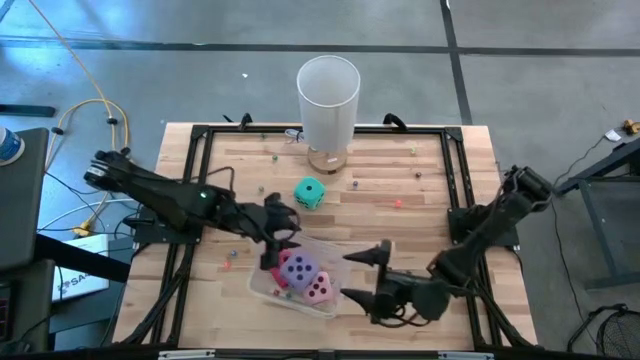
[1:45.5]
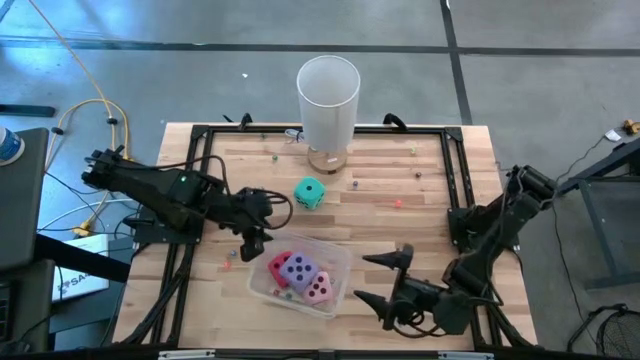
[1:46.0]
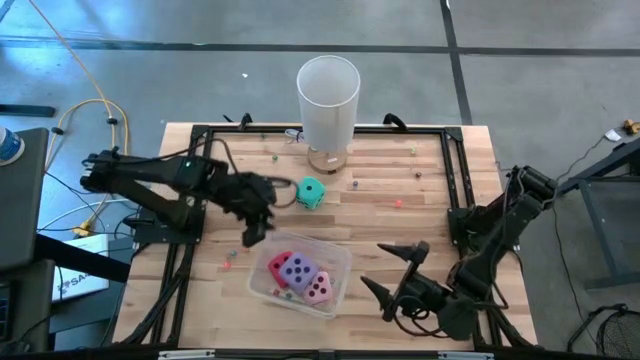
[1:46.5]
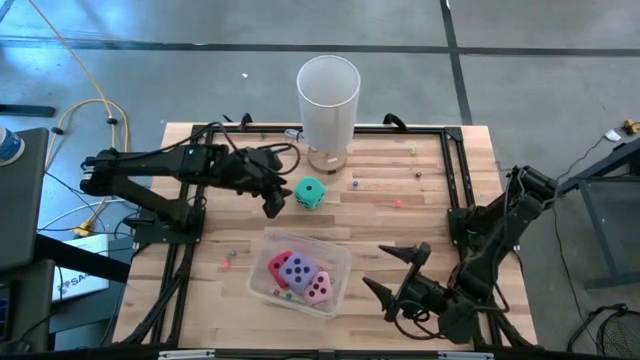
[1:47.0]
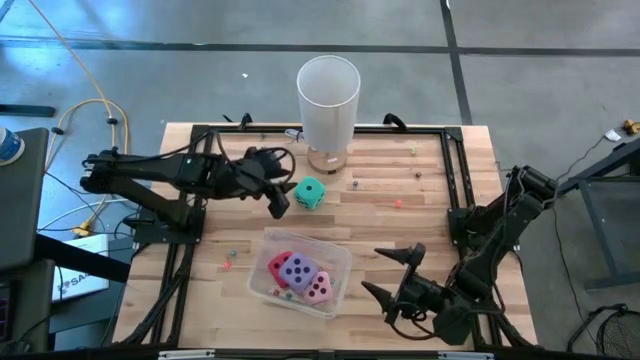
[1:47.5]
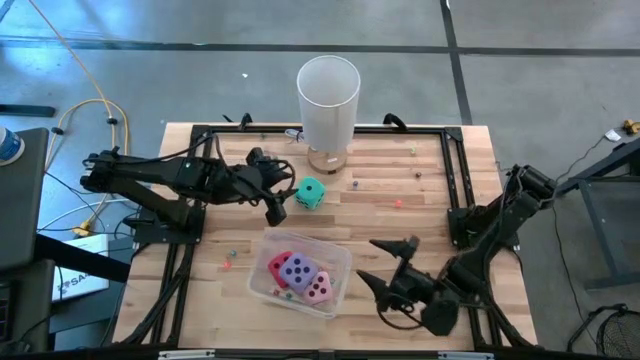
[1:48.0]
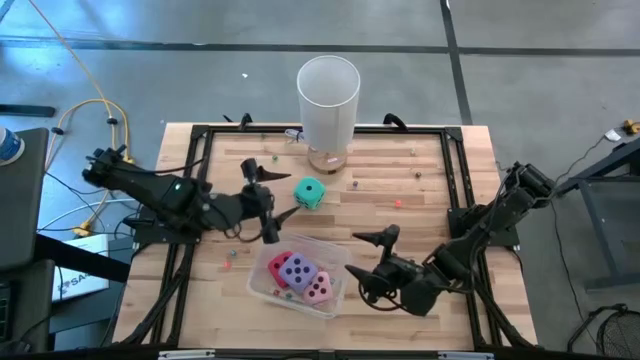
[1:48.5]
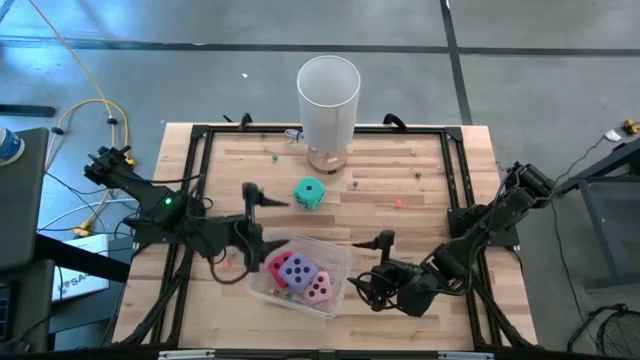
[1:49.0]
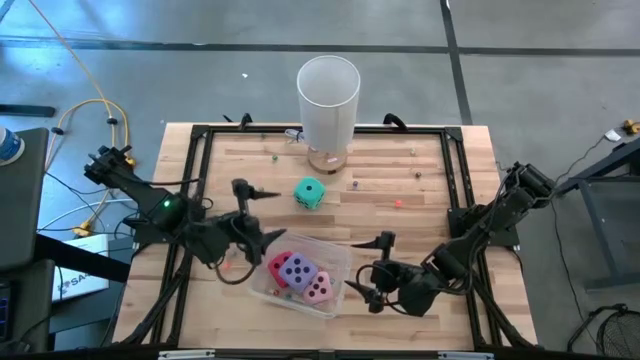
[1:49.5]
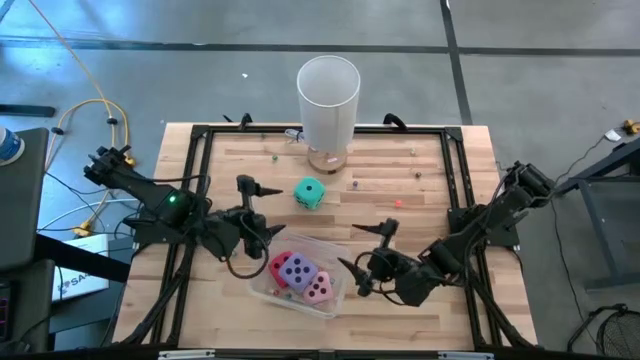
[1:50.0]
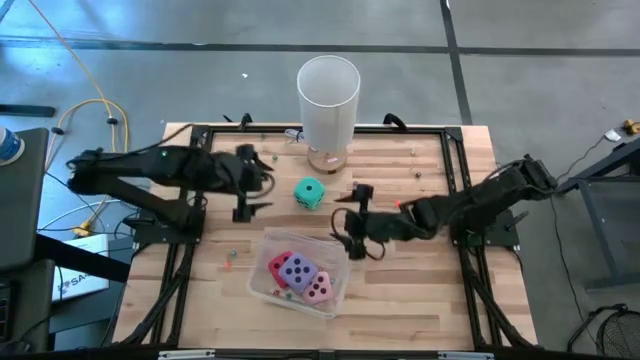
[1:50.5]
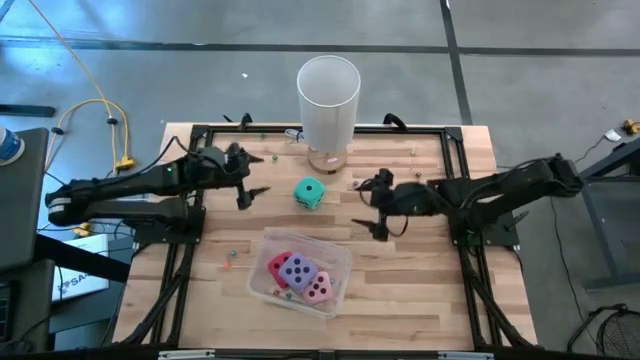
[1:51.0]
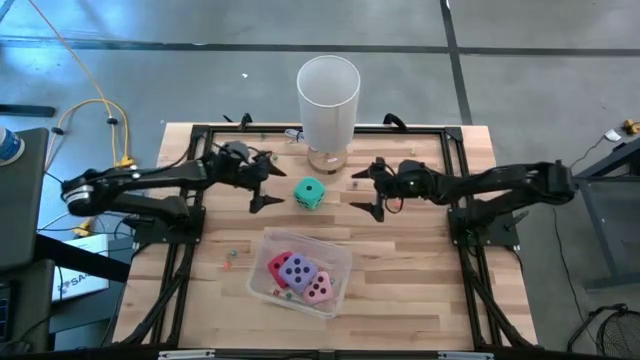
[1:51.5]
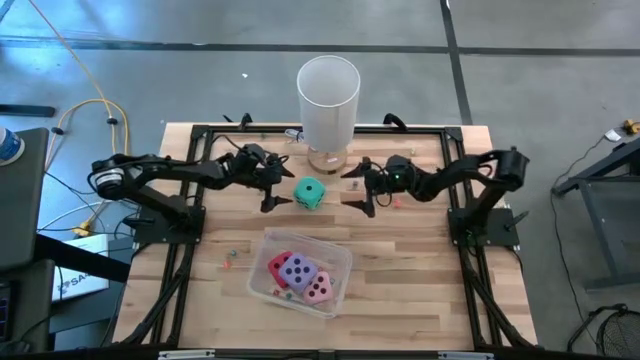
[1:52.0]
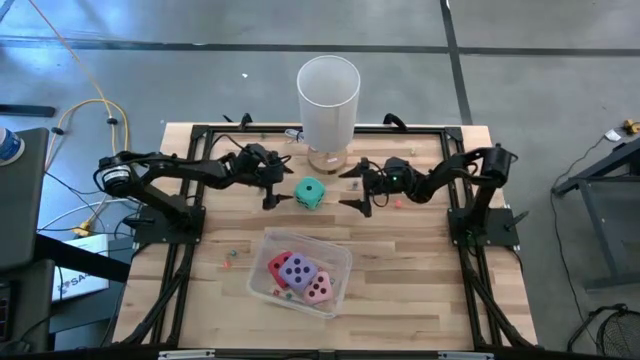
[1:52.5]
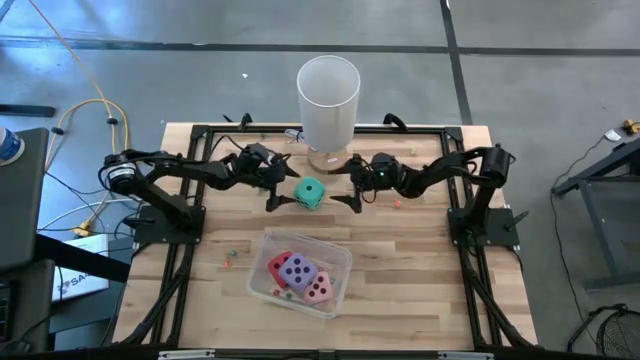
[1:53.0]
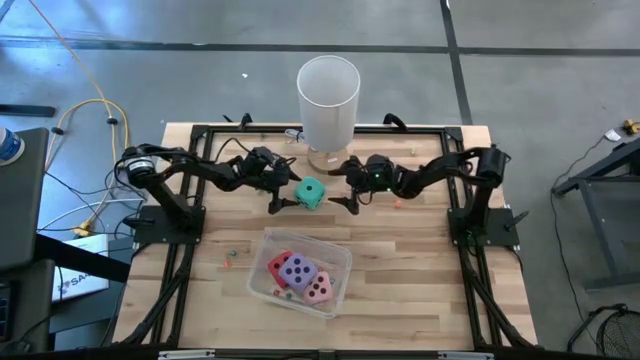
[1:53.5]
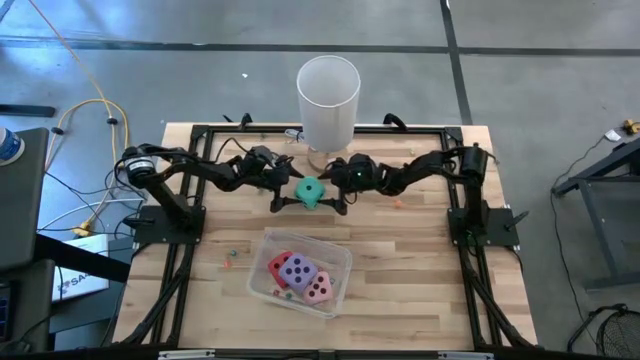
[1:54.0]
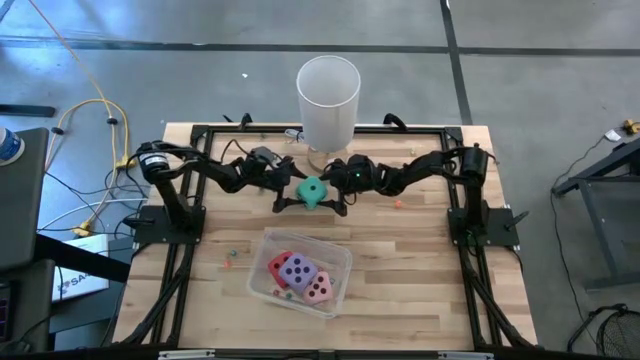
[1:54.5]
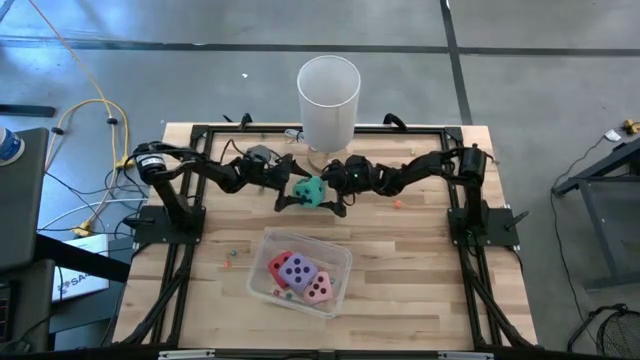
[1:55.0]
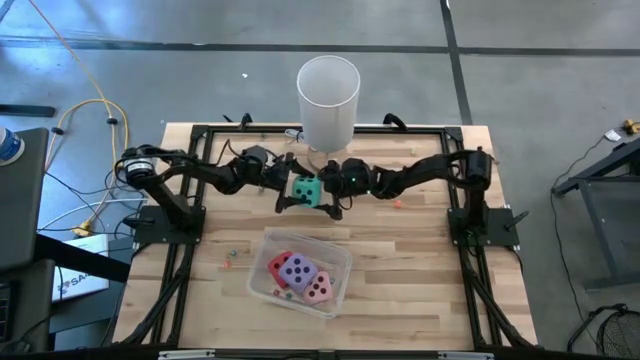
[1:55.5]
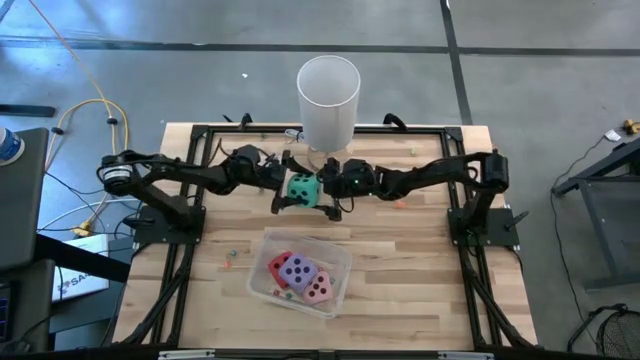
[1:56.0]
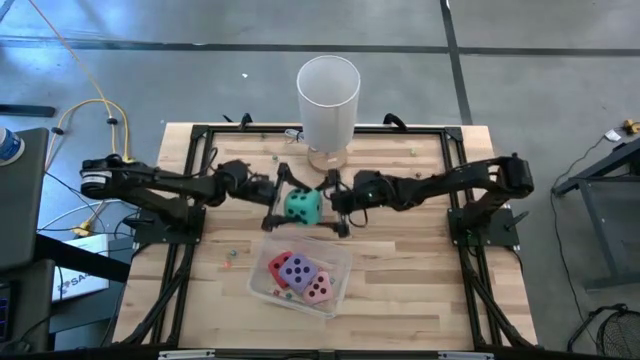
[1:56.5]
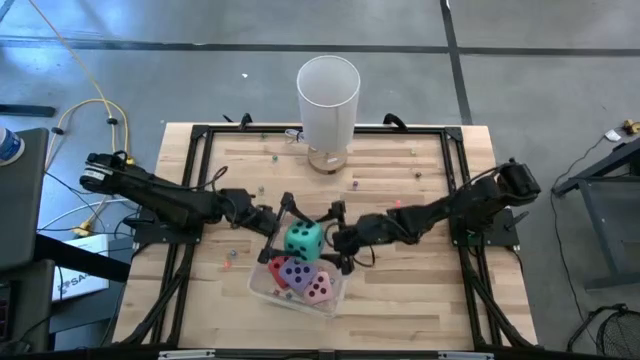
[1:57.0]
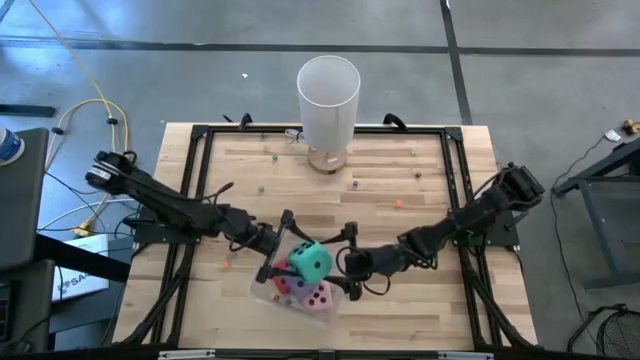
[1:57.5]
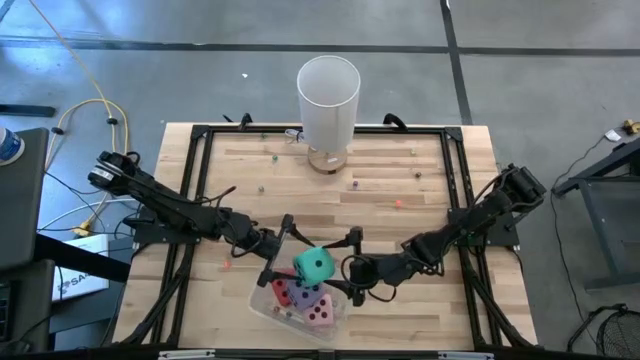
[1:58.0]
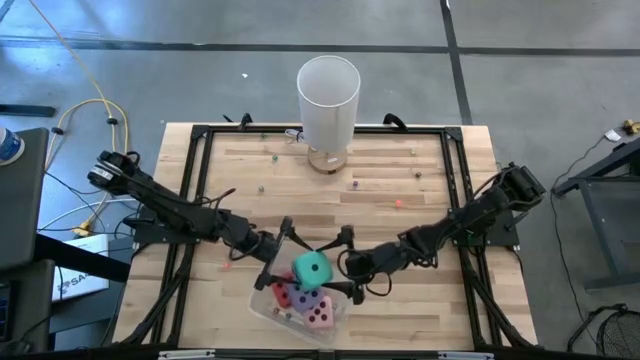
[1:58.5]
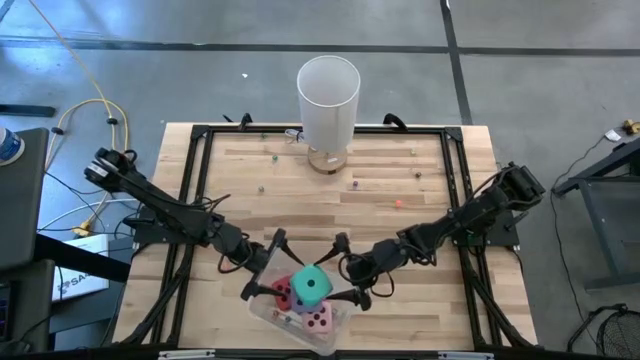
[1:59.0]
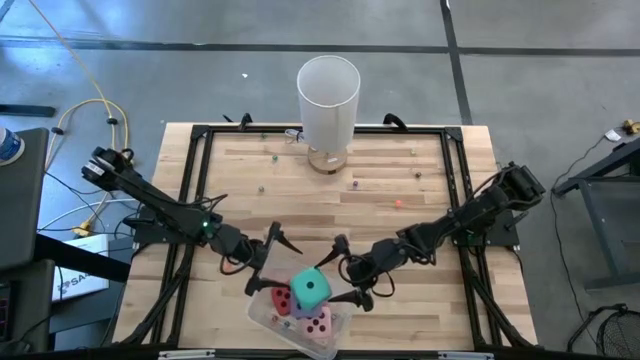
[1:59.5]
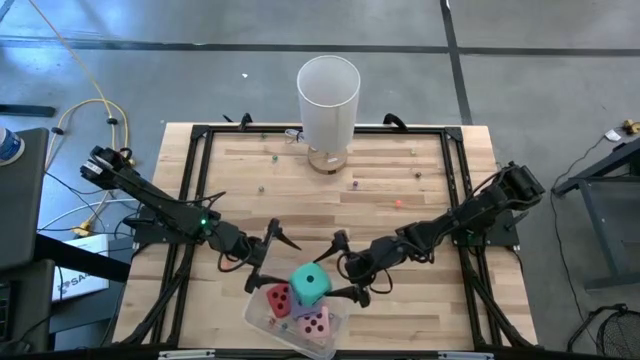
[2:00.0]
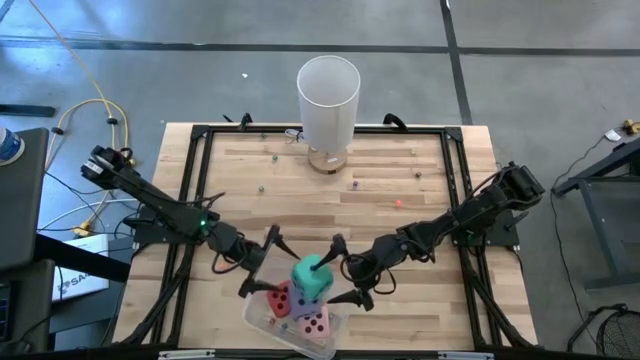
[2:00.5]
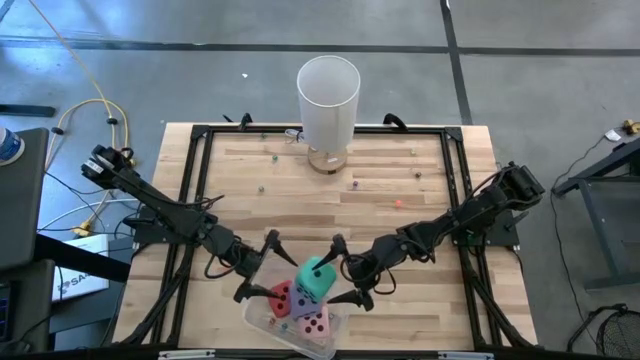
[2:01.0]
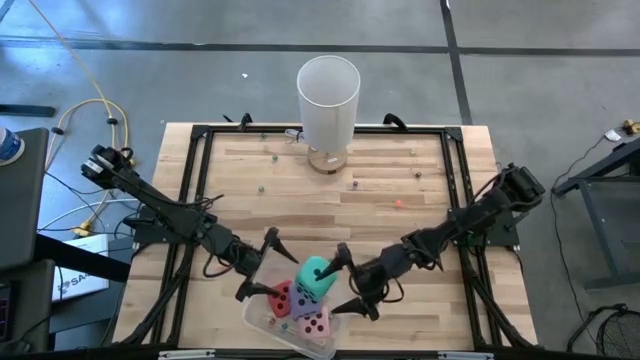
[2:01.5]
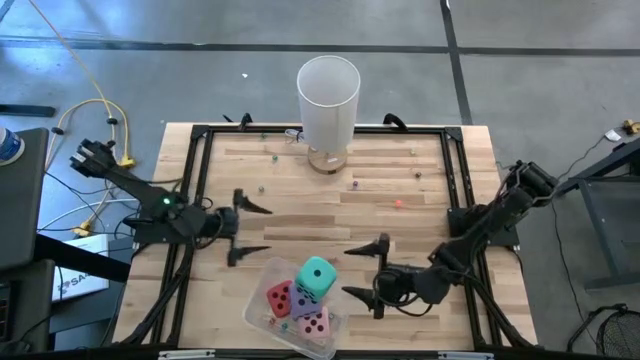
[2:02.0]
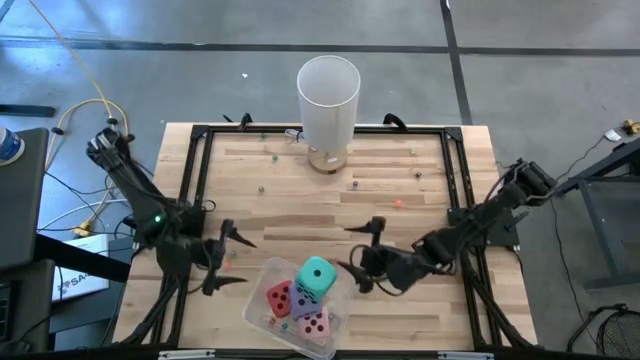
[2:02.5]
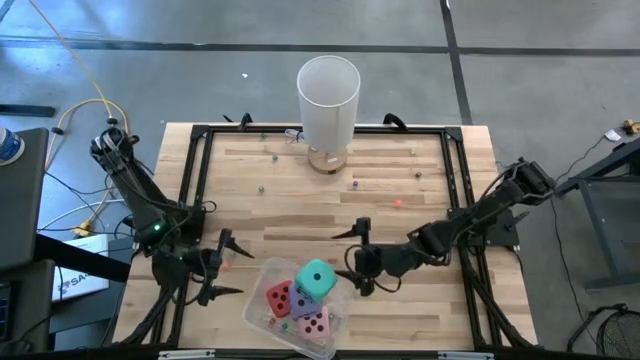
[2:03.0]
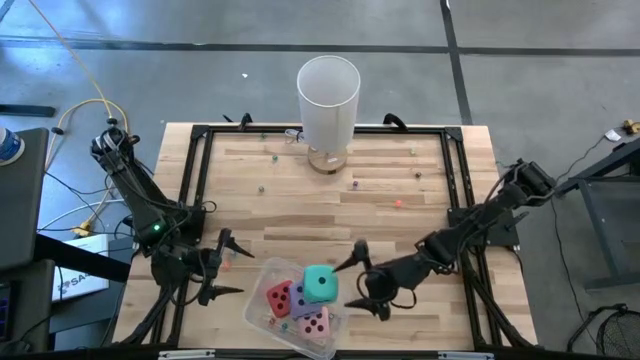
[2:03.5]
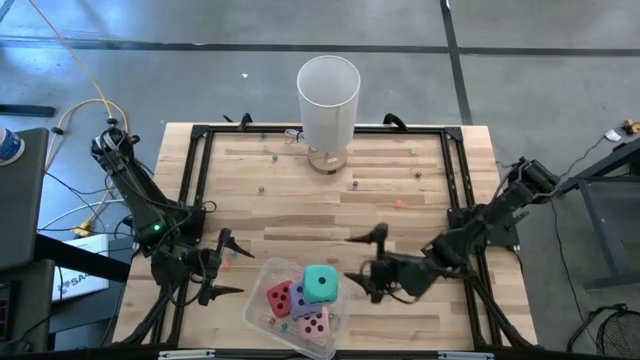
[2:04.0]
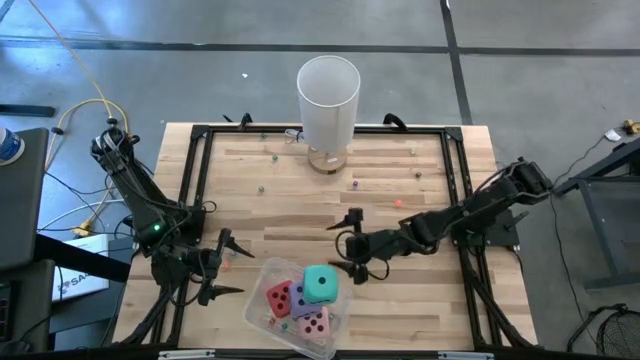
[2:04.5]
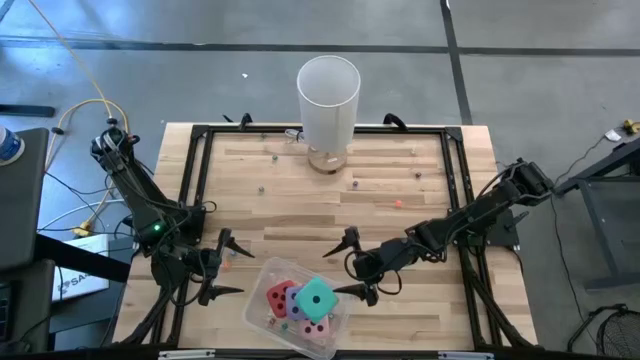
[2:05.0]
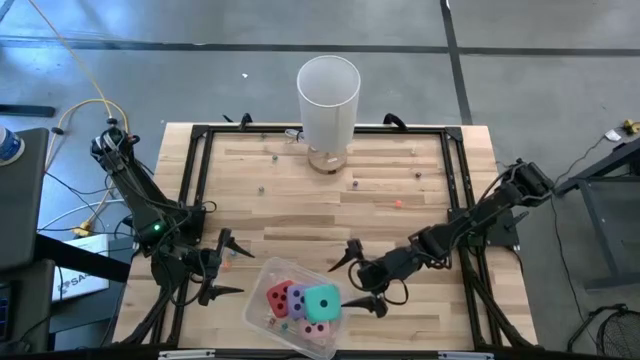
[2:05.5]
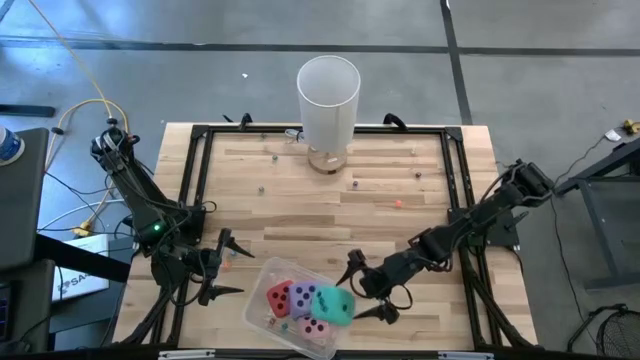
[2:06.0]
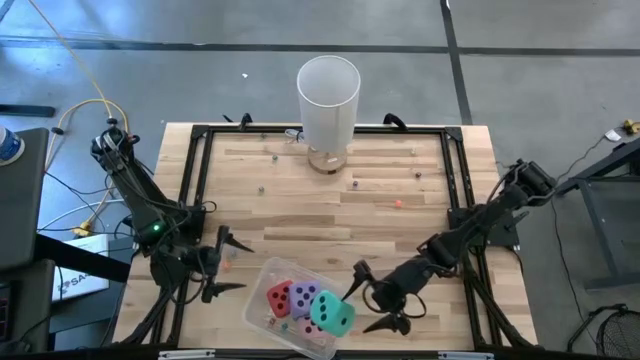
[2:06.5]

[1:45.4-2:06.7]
Task: Pick & Place Dice
Put the big light blue dice into the transparent bin

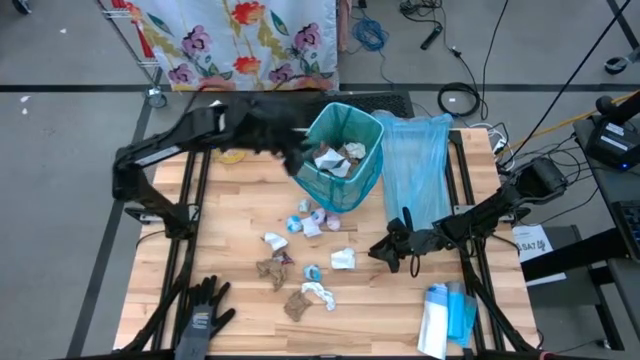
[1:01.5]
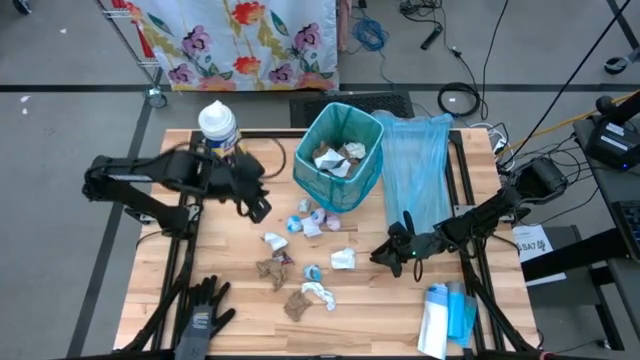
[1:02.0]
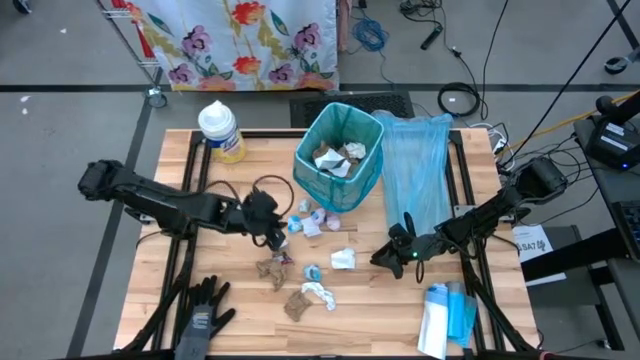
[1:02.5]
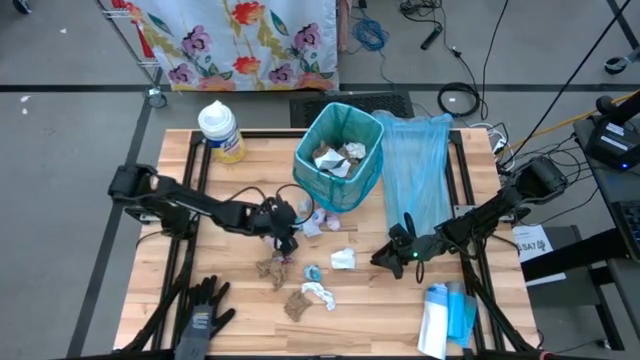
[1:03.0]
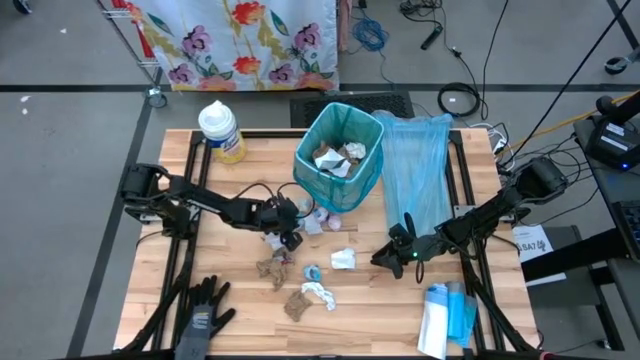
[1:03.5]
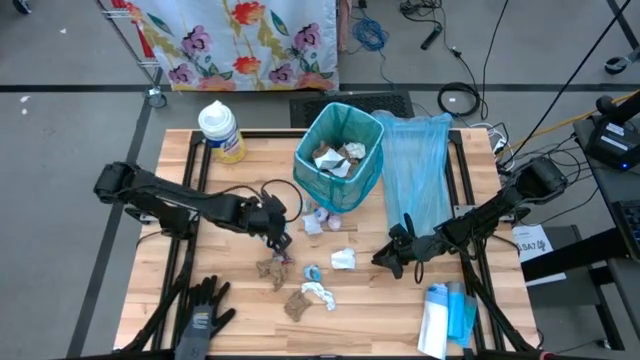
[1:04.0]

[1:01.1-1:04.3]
Task: place trash/remove bag and relplace
Put the top blue plastic into the trash bin
